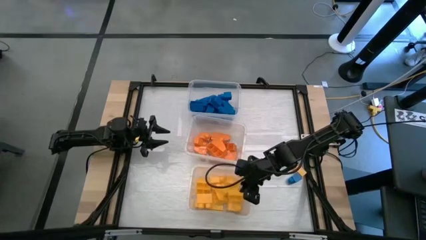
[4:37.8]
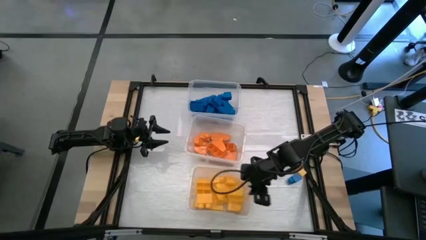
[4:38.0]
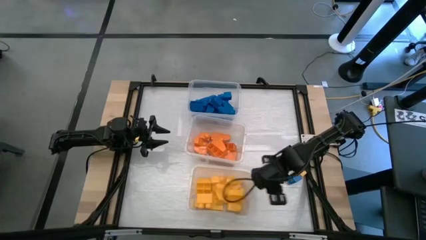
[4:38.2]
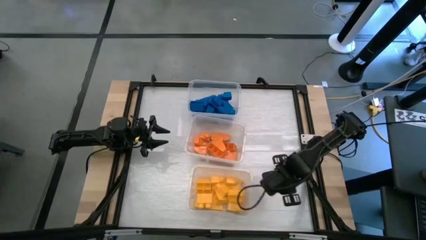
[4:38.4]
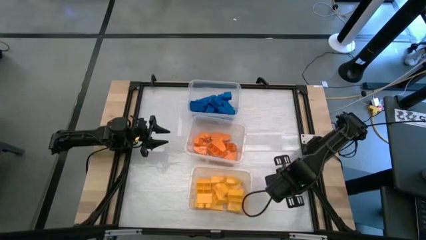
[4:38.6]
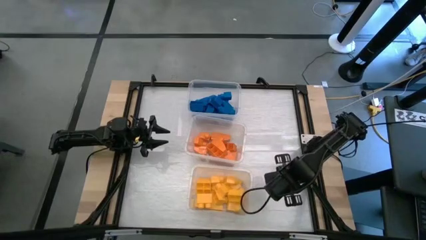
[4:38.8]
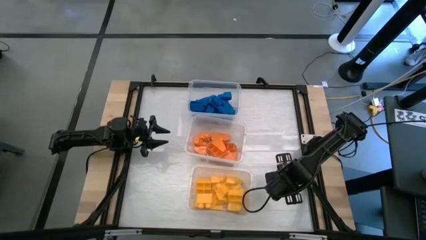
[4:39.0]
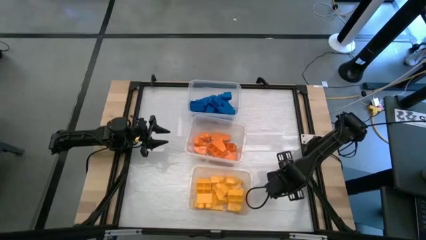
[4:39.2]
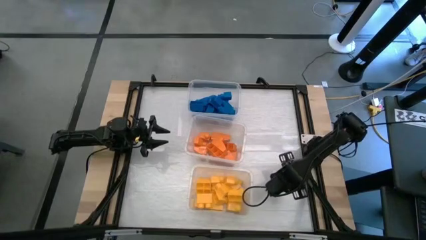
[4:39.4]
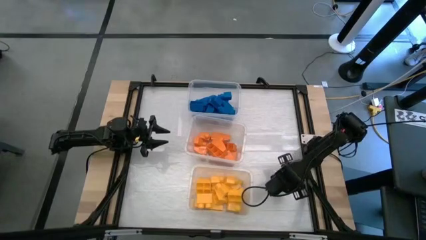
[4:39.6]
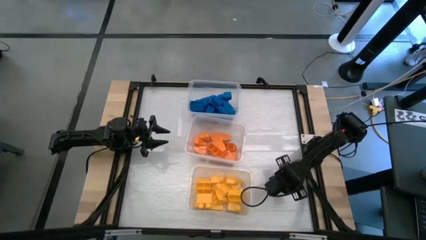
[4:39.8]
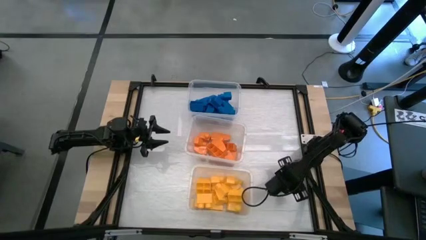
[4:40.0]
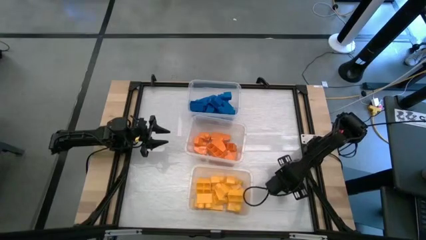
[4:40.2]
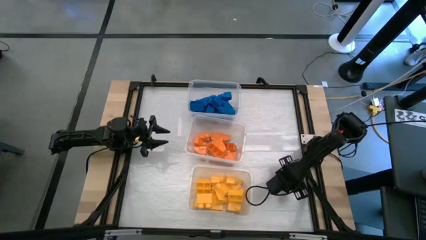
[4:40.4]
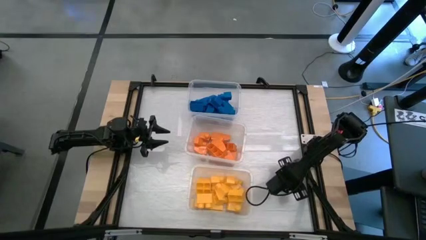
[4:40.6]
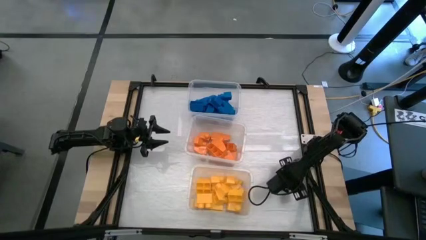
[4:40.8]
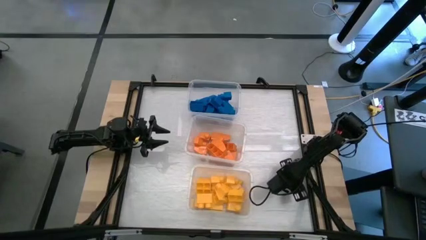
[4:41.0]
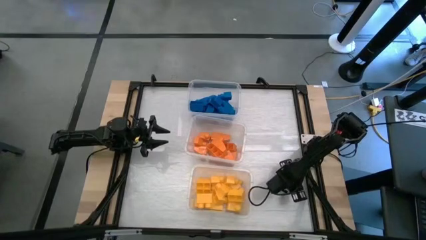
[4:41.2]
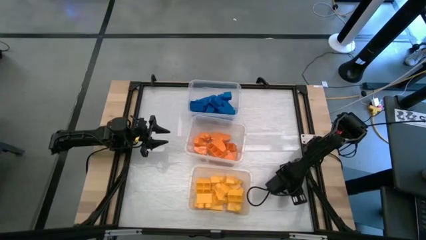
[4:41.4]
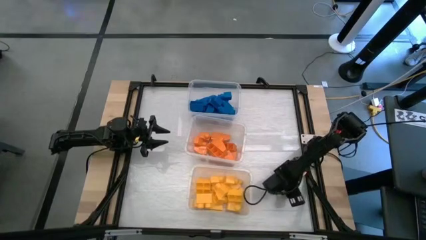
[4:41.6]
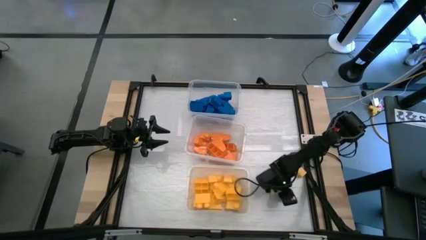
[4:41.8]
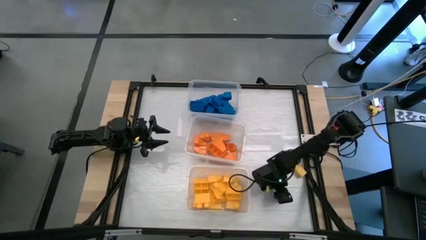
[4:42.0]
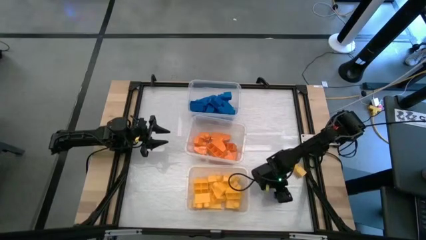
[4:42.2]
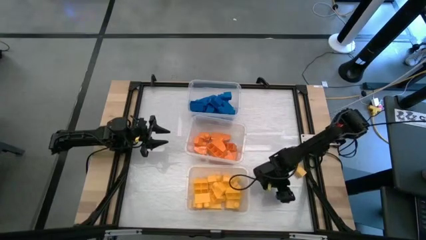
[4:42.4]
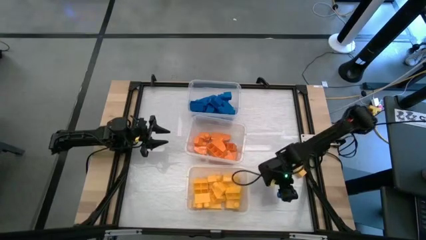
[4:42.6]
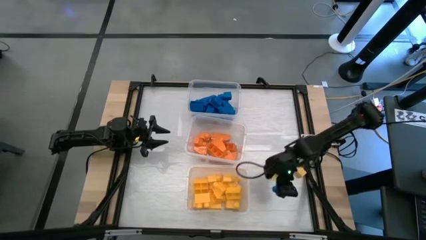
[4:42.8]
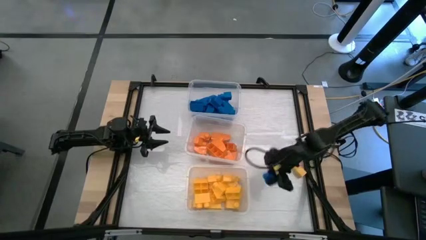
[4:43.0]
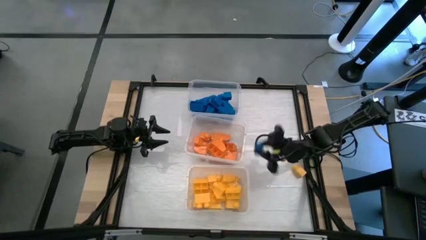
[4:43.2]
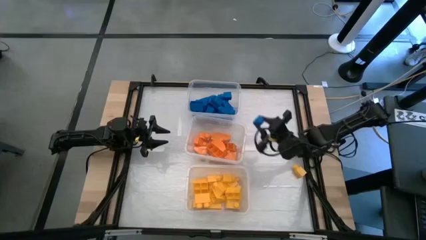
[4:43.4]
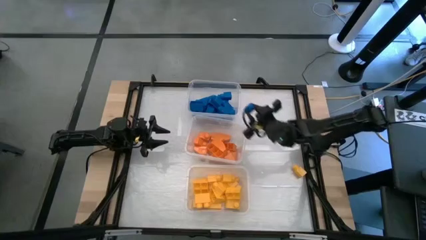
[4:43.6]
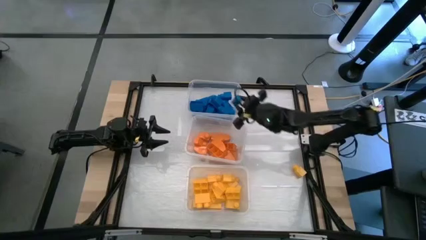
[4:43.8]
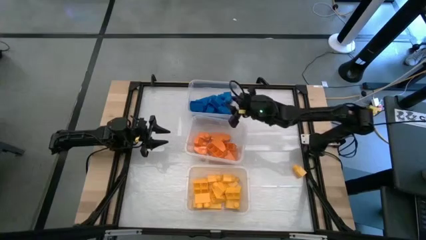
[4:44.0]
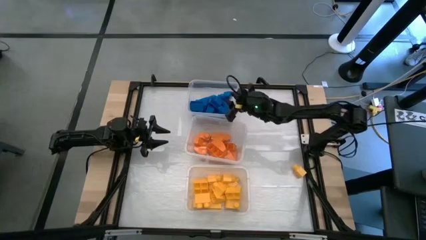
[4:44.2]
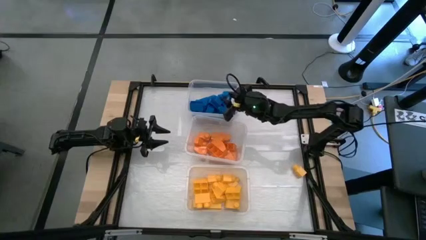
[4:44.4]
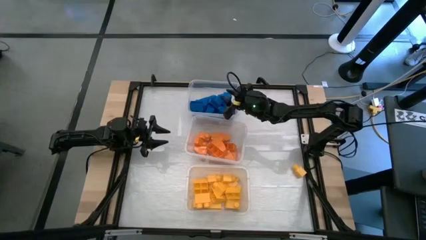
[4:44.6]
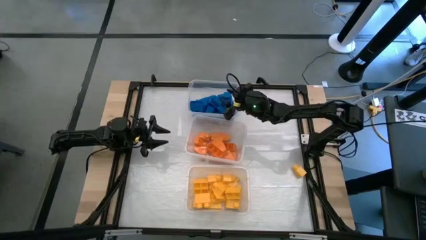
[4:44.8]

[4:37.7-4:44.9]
Task: Sort blocks
Put the blue game piece into the top transparent bin

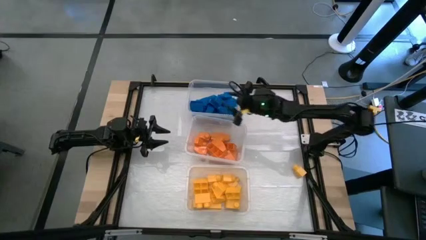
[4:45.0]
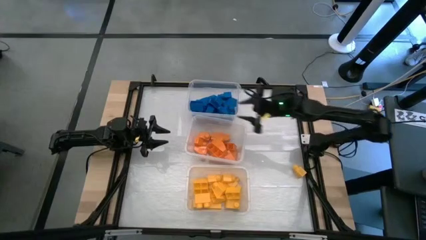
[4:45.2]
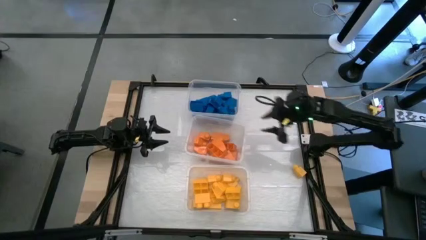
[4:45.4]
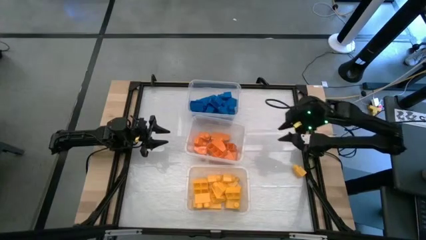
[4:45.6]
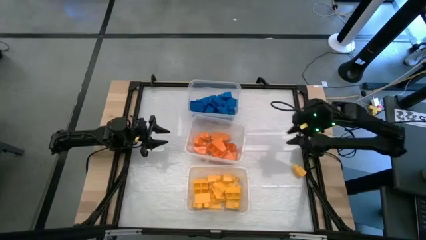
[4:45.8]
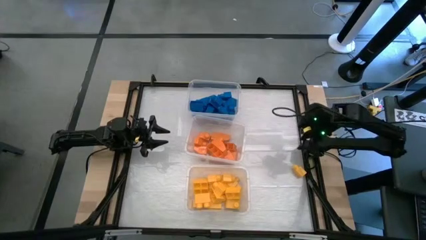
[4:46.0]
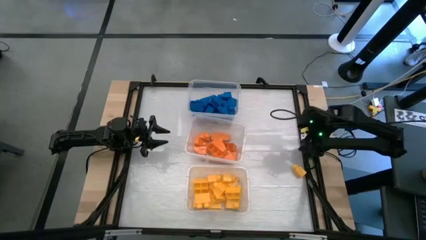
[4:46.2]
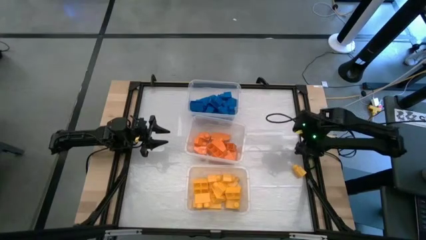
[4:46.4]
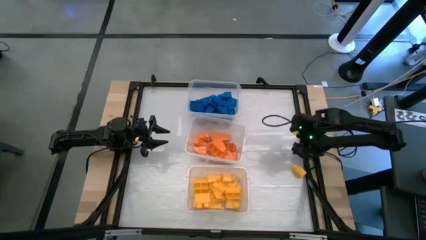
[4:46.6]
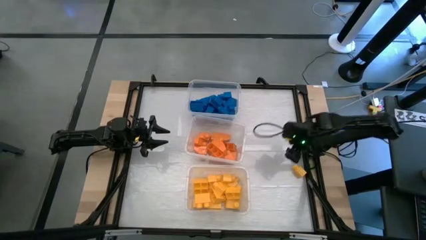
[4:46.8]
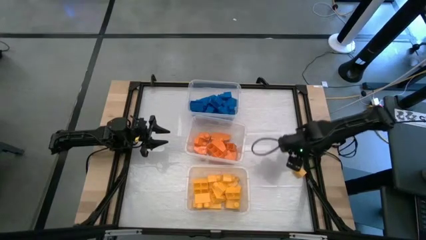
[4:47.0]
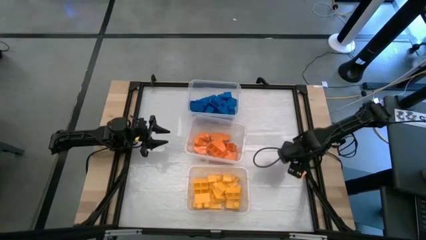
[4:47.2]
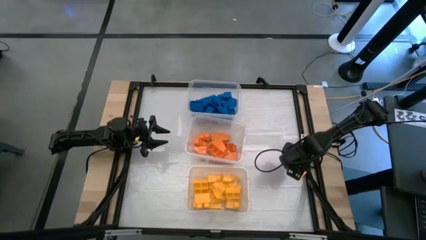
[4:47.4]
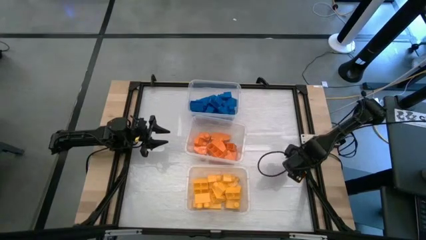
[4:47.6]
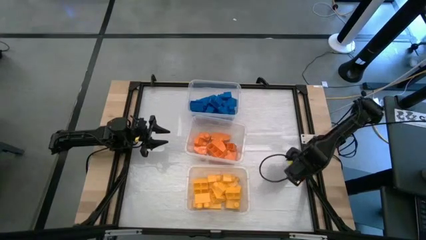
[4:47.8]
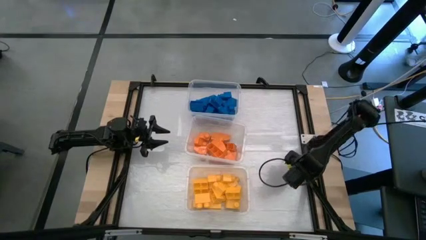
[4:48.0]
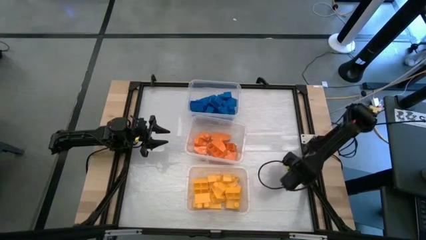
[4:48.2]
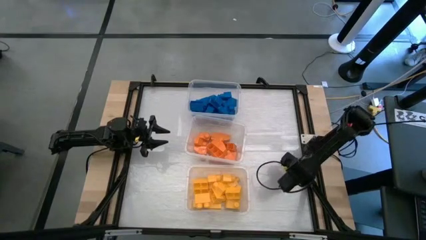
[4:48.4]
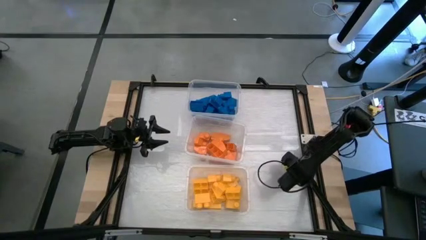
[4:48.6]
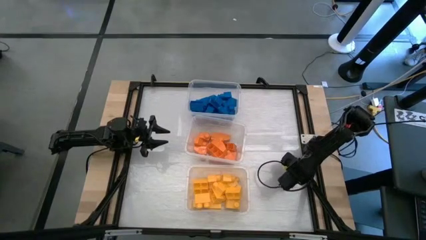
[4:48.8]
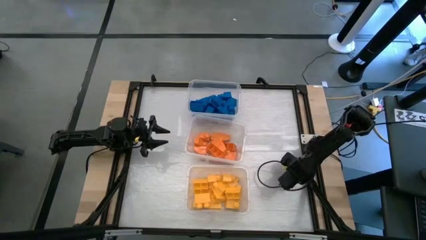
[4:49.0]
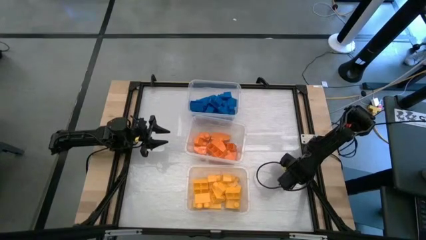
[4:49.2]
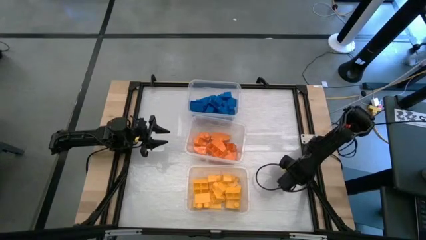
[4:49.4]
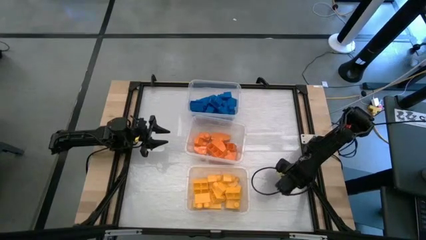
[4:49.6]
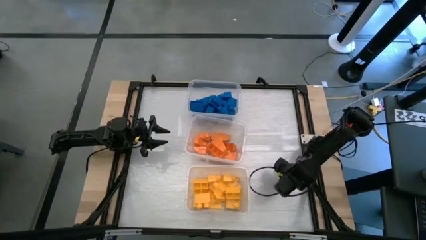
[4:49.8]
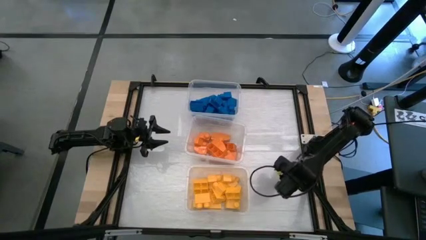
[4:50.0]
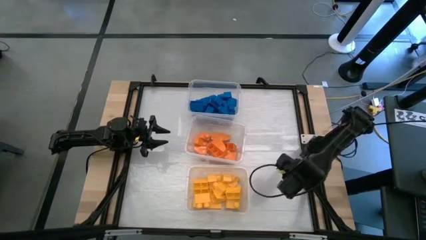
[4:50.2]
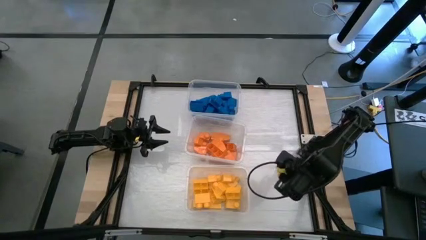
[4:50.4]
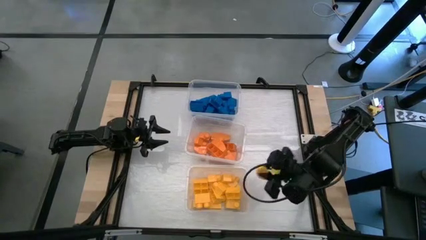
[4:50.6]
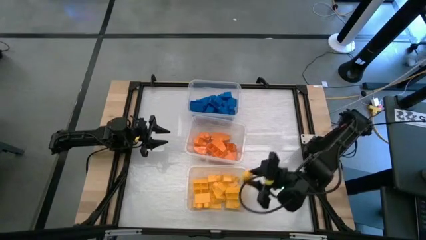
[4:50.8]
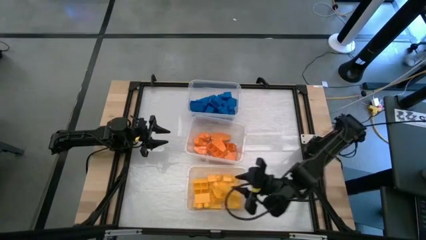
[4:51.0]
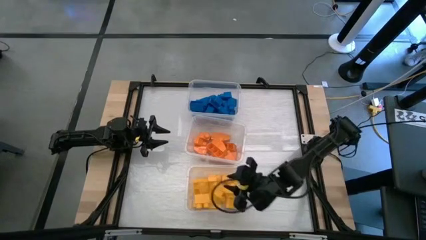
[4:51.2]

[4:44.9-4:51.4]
Put the yellow game piece into the bottom transparent bin

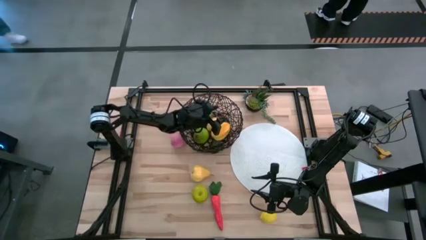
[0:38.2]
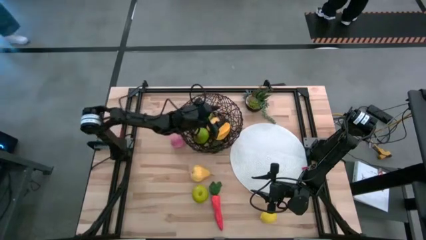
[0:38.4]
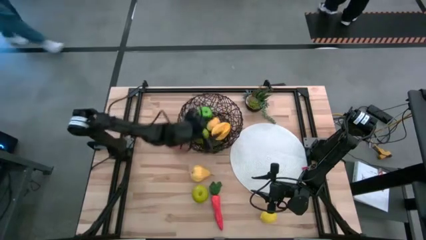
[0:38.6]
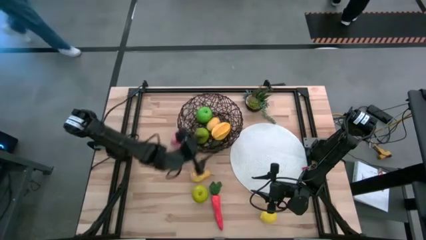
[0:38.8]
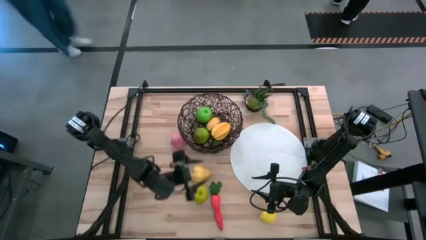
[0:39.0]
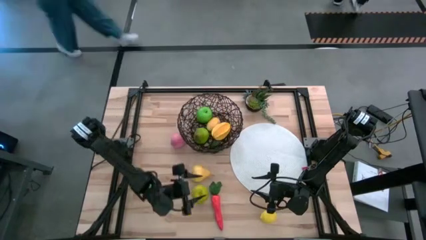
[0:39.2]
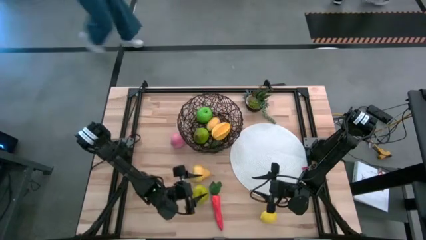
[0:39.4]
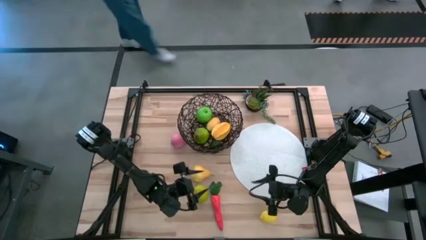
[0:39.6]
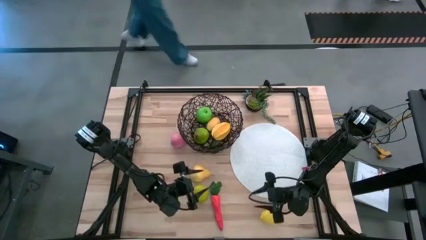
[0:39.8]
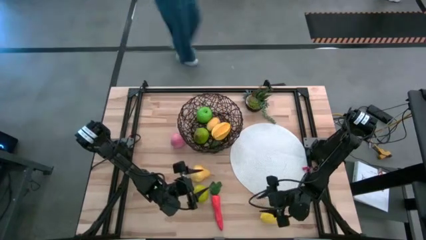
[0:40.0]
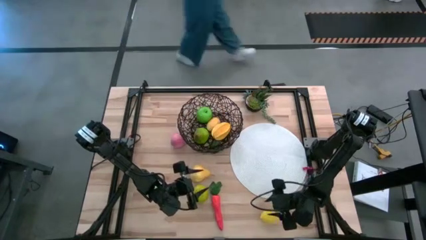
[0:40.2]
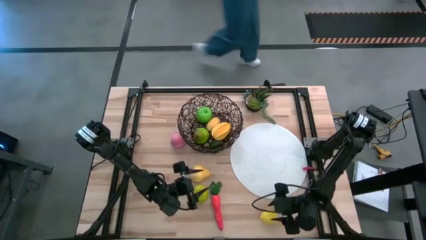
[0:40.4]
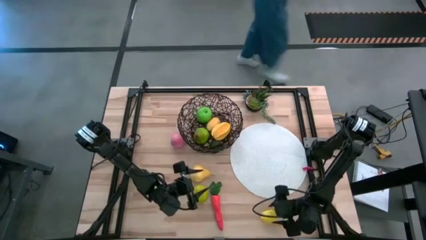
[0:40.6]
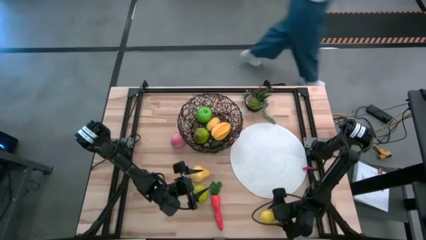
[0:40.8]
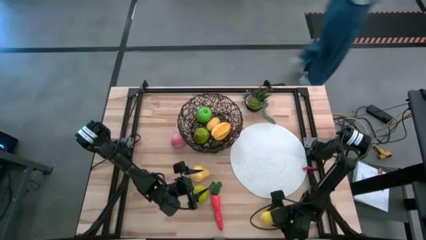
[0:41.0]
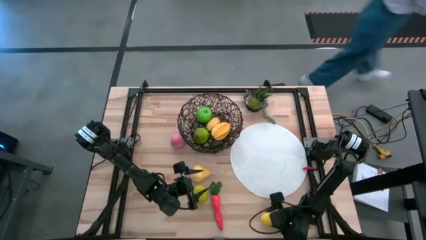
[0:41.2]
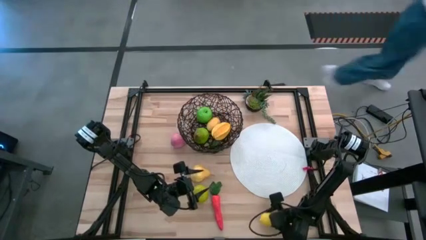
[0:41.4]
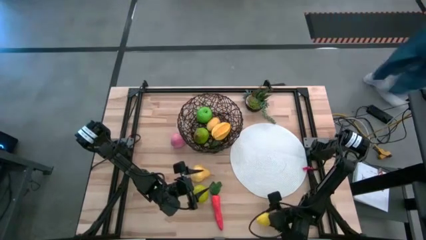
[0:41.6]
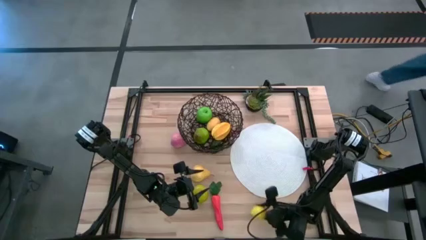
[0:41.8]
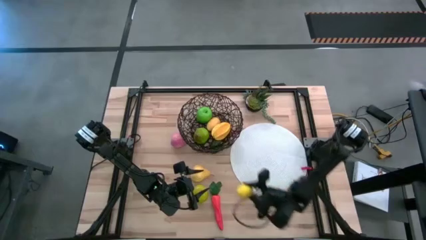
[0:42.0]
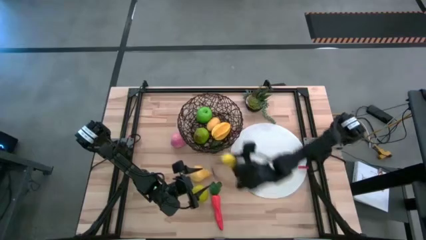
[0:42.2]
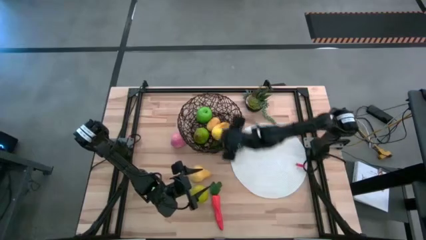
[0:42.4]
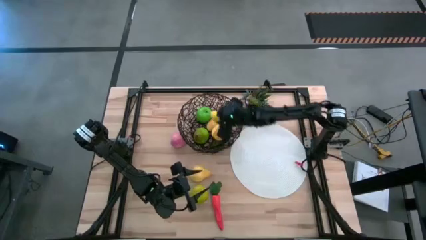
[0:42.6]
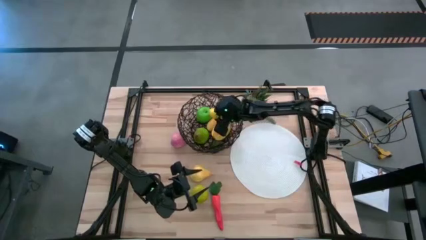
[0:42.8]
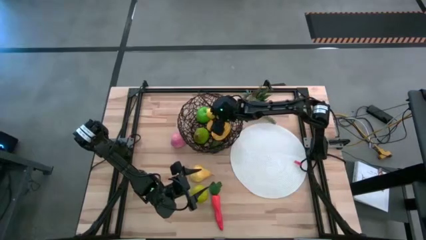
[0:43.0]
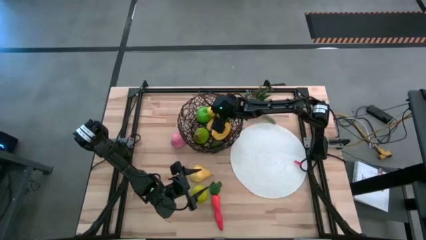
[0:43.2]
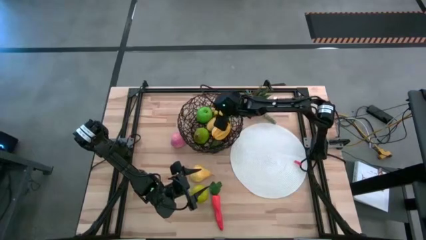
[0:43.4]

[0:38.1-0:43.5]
Task: Build produce basket
Put the lemon into the wire basket
